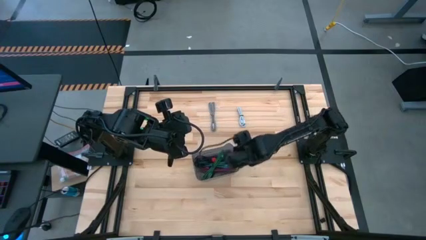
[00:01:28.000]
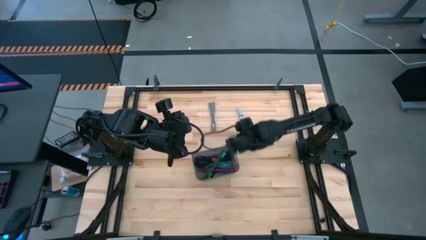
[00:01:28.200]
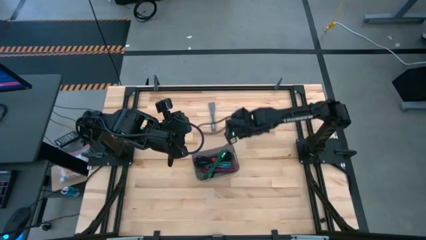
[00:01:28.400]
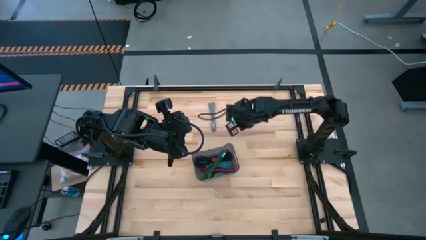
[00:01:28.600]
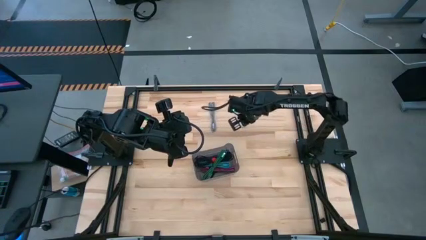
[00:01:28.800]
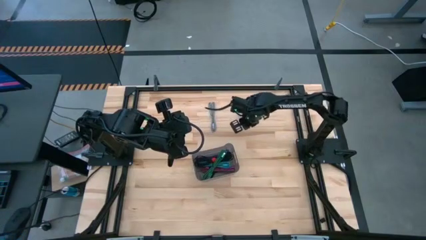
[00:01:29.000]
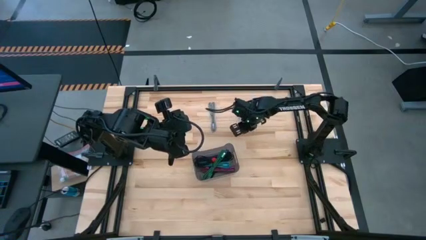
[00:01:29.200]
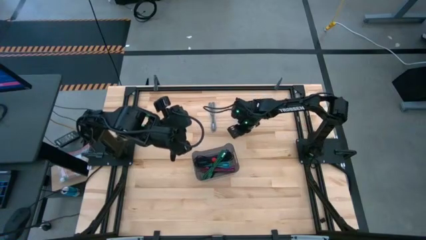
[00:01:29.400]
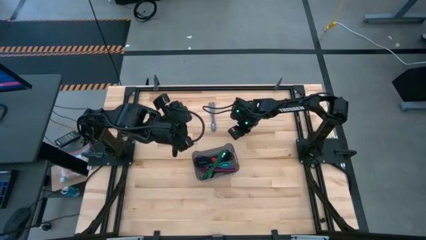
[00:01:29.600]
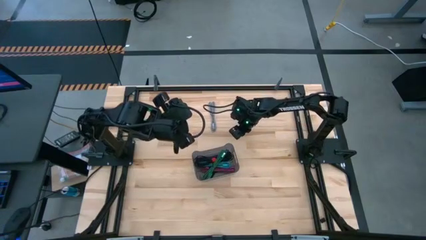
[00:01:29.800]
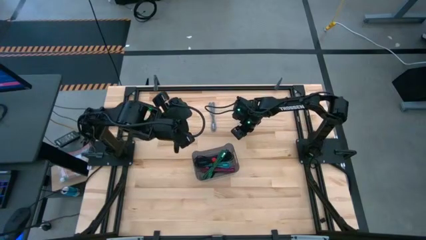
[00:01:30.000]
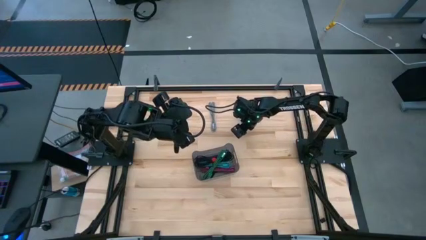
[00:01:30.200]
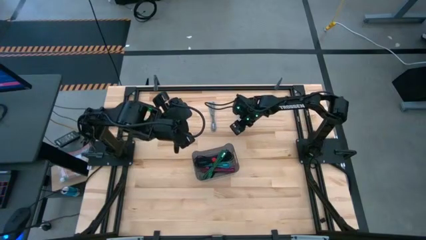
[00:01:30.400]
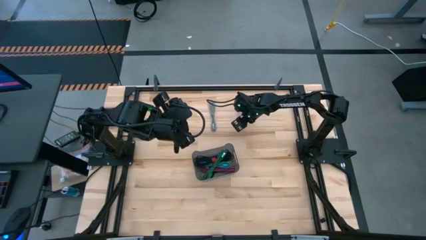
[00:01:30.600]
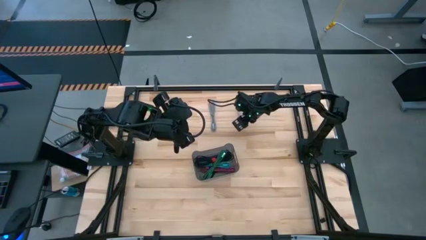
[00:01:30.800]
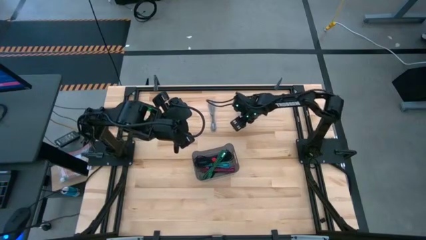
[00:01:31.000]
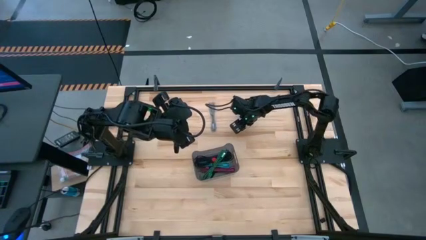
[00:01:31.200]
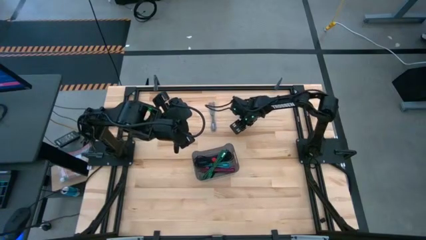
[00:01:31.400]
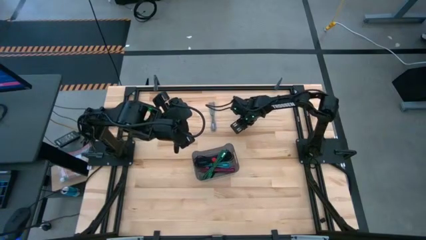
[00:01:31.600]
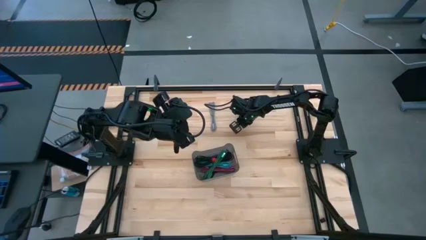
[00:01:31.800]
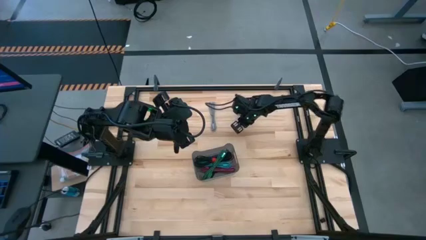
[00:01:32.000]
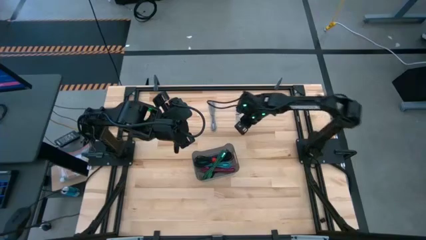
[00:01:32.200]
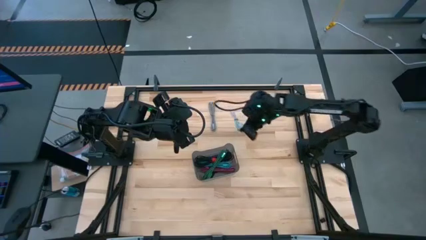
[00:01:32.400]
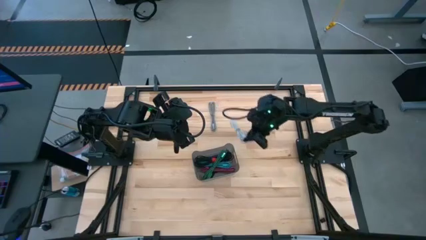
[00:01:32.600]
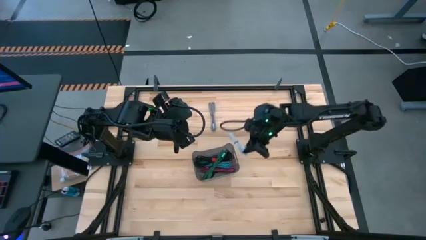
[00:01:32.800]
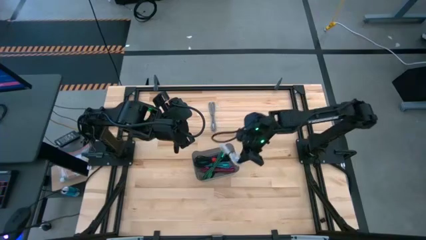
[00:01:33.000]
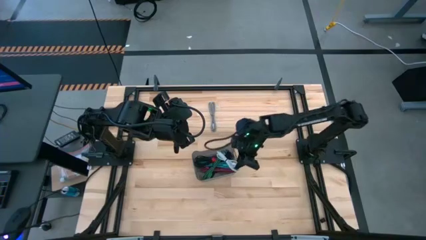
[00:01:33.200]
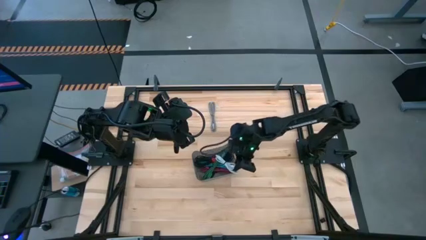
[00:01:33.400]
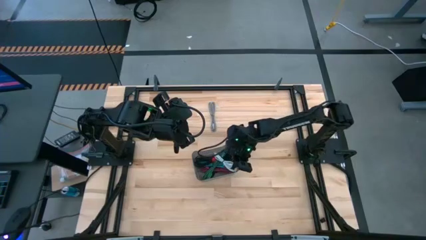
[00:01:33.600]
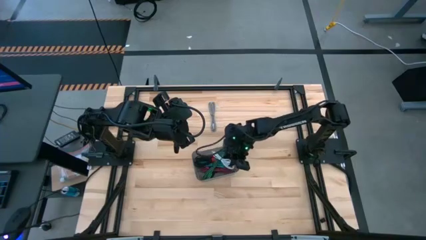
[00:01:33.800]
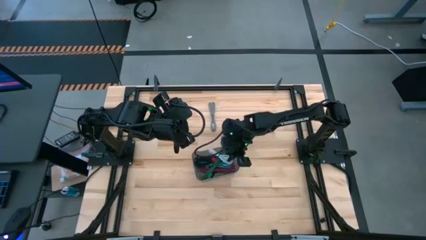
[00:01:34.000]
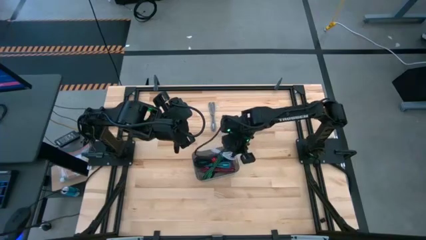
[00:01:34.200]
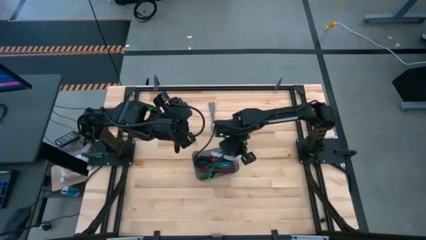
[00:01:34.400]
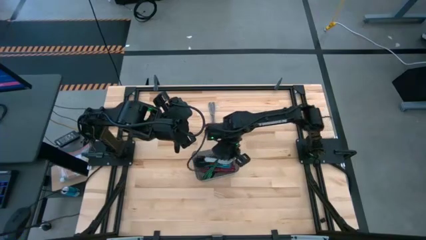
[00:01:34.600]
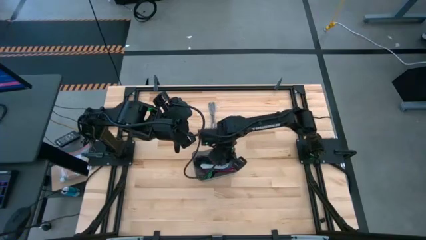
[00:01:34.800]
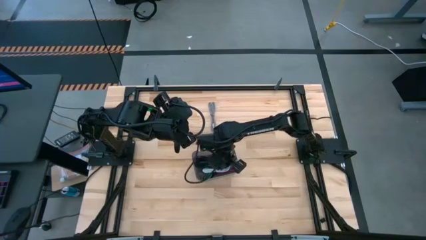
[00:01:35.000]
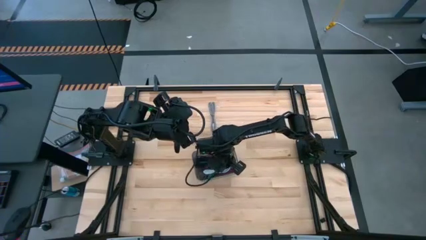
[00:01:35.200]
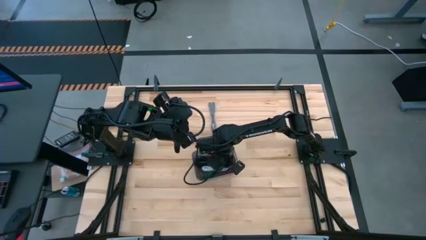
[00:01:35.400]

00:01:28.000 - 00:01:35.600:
Task: Pick and place USB-C Cables
Put the white USB cable into the black bin

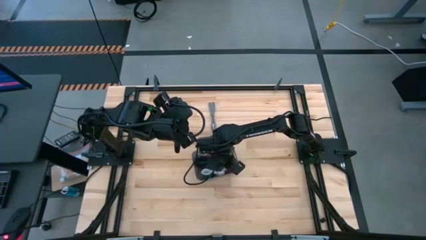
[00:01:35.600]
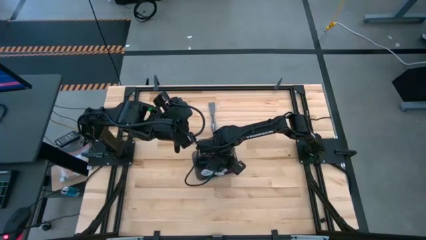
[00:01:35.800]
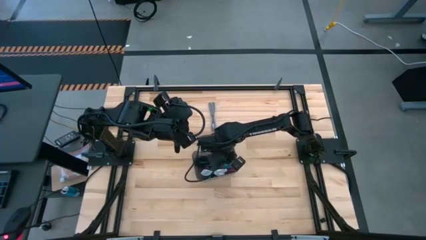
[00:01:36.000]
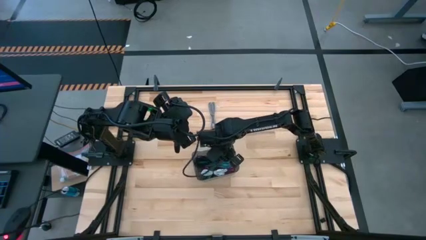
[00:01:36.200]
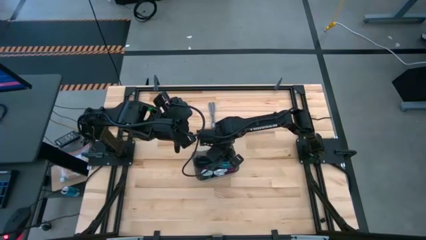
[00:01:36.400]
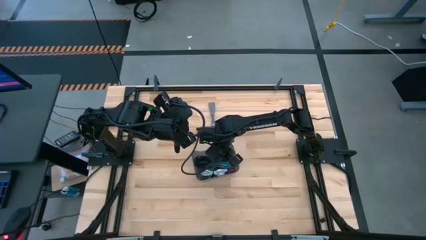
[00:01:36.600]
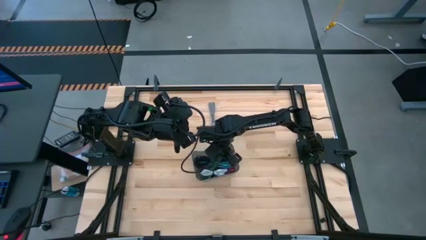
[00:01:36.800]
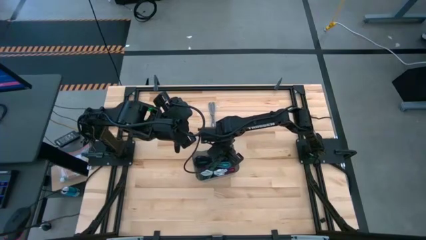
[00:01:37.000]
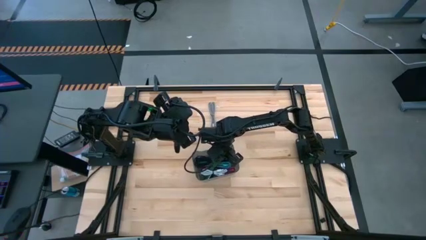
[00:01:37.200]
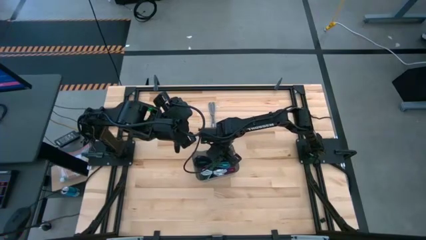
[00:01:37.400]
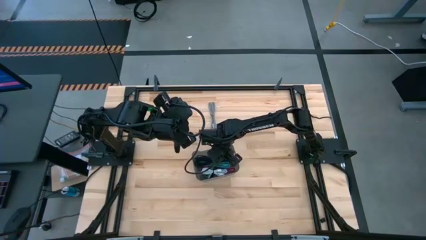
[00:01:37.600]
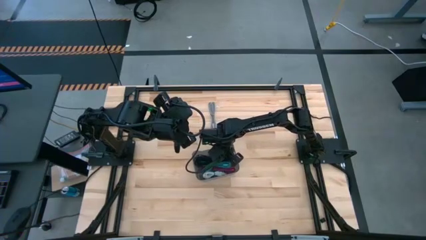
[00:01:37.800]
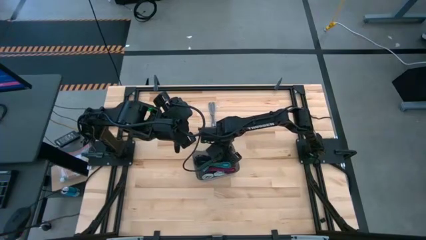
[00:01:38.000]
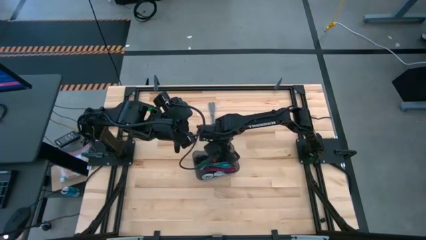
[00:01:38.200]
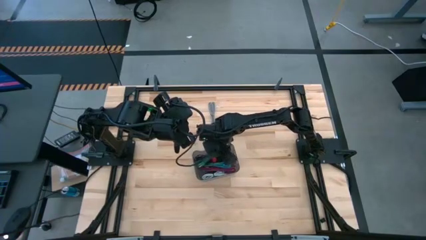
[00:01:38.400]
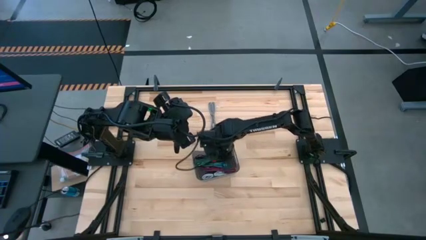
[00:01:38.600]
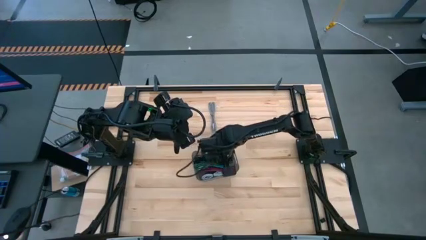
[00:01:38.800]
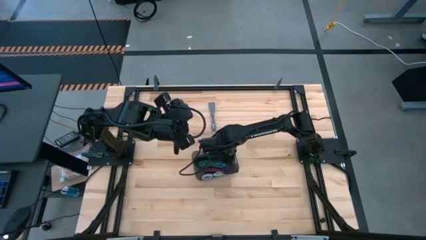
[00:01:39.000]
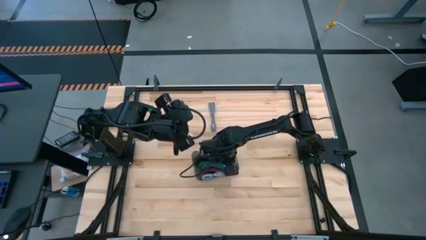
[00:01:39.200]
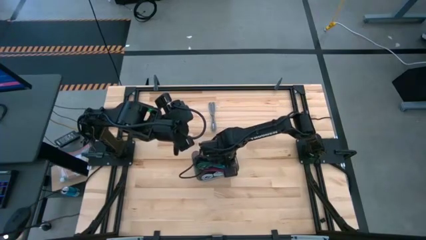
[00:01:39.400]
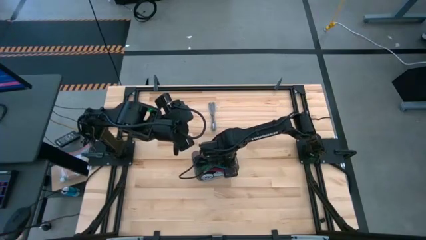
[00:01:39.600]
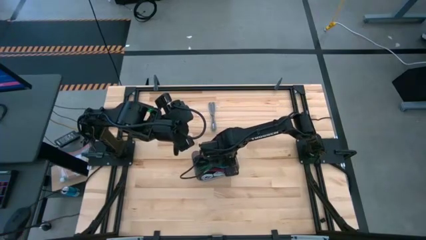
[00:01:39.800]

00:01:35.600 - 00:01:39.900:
Adjust the green USB cable in the black bin

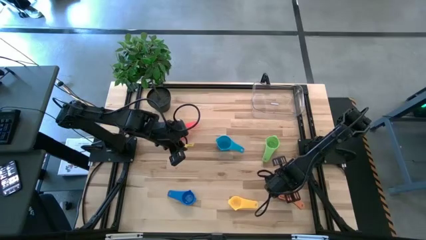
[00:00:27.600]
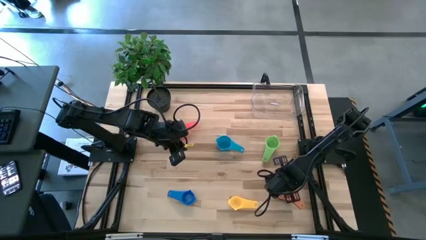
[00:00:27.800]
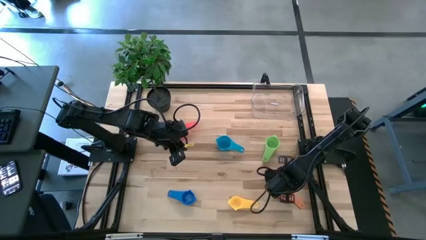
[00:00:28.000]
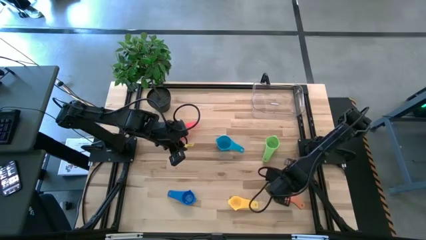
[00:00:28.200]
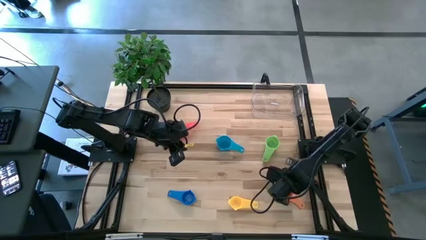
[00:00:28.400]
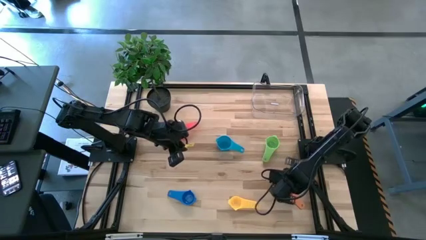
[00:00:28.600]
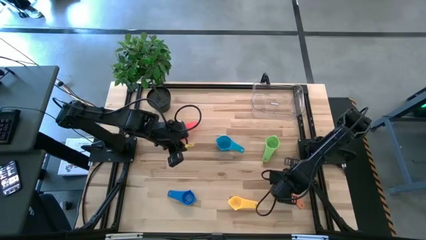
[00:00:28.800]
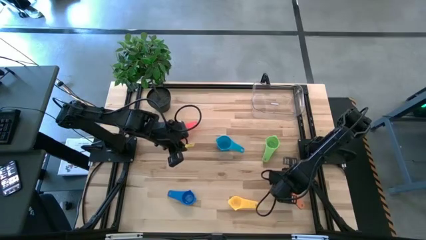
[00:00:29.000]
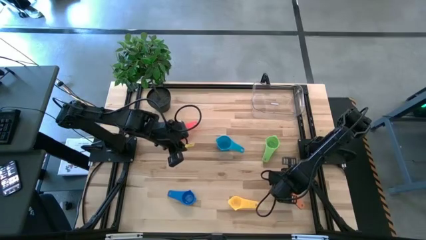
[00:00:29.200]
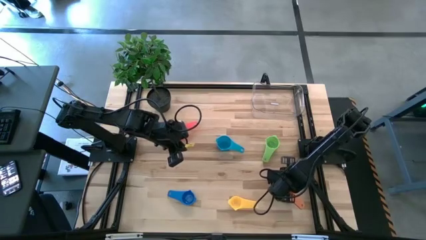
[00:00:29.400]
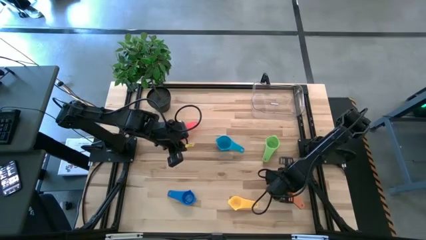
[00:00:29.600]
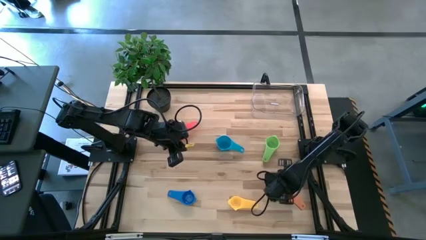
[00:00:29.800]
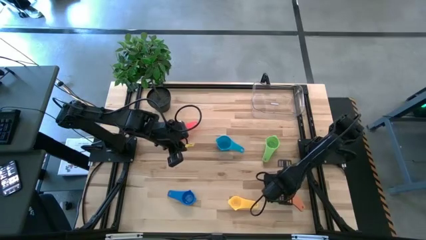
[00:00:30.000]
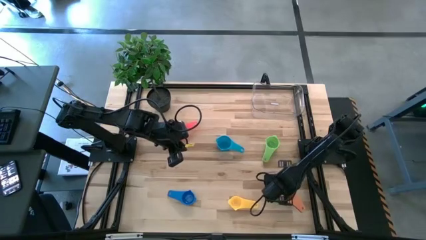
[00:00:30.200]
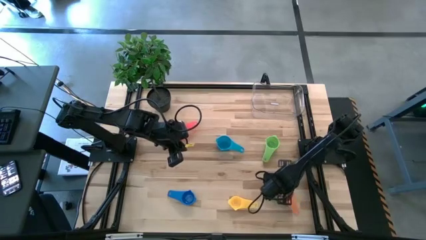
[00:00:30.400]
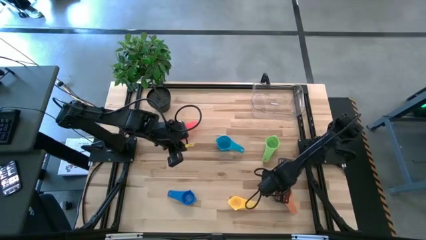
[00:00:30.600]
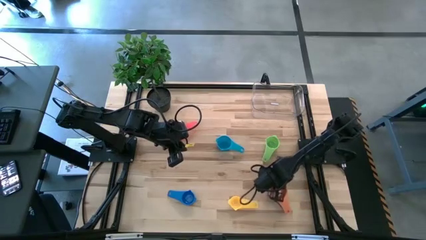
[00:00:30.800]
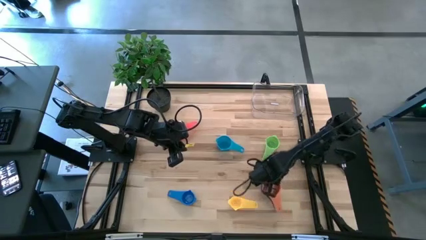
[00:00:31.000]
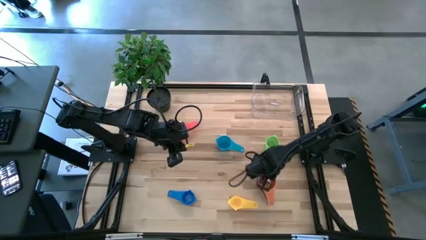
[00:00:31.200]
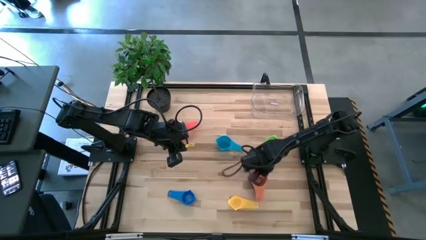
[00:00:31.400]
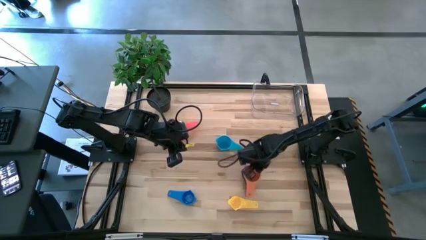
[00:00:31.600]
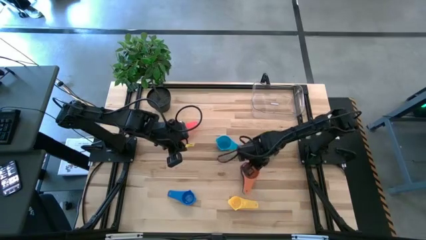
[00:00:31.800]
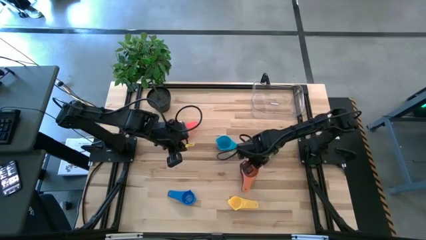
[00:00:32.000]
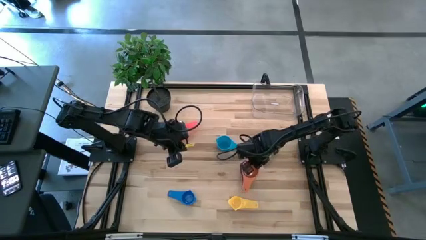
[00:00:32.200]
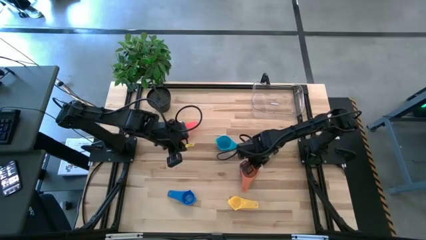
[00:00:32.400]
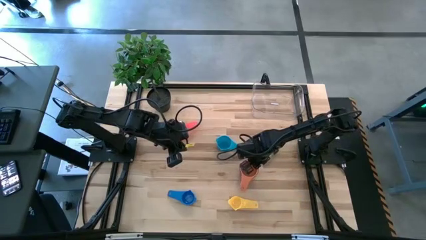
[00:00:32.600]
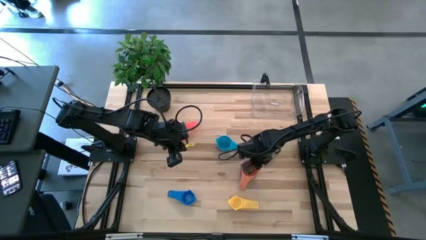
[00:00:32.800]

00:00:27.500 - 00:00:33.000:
Task: Nest measuring cups in basket
Move the measuring cups to the center of the table
